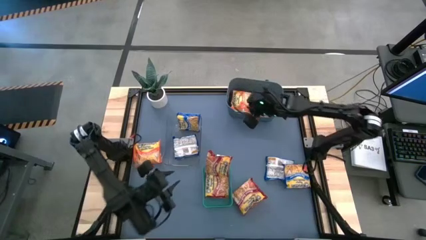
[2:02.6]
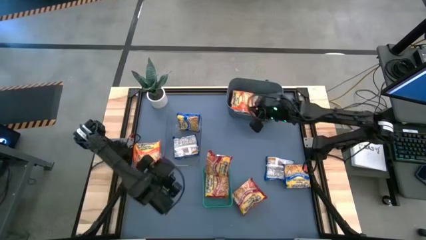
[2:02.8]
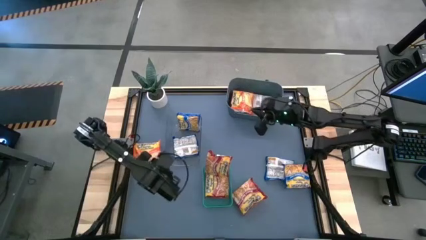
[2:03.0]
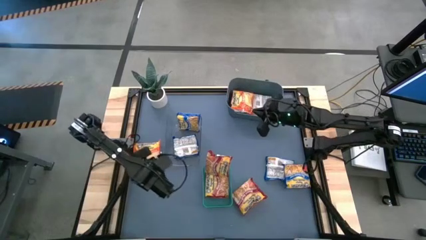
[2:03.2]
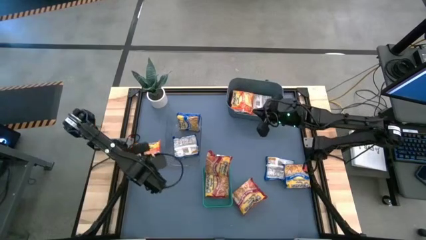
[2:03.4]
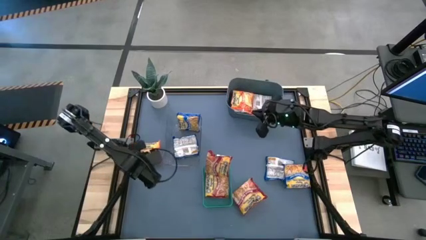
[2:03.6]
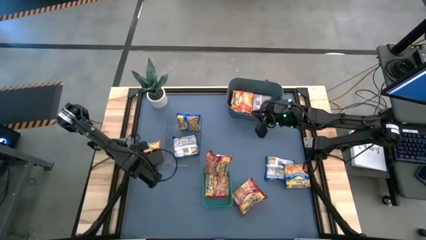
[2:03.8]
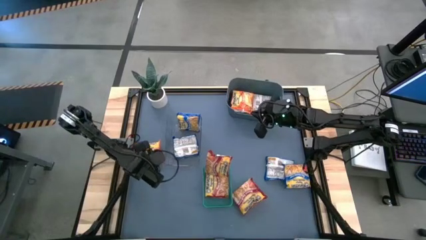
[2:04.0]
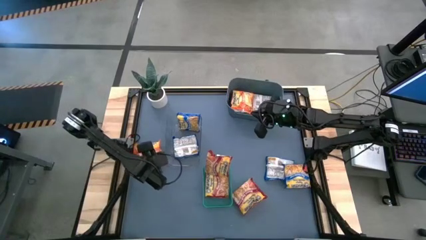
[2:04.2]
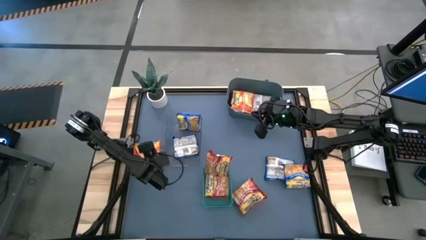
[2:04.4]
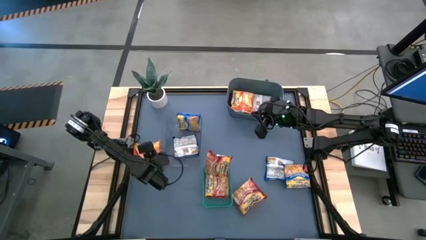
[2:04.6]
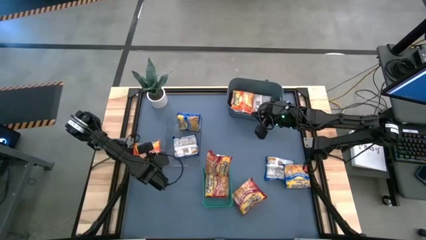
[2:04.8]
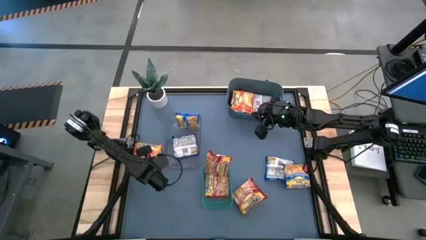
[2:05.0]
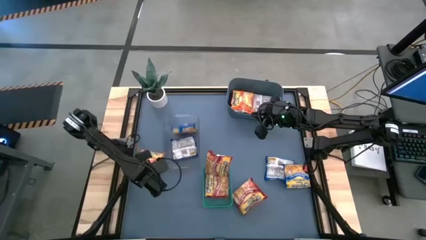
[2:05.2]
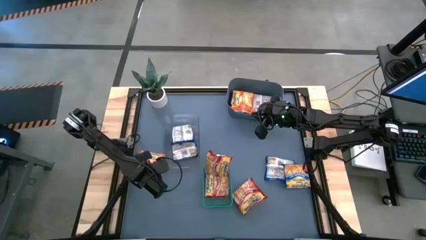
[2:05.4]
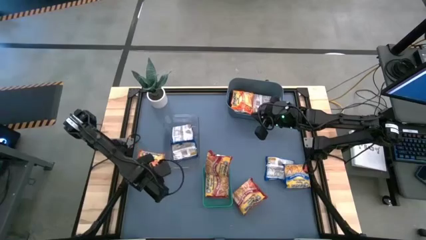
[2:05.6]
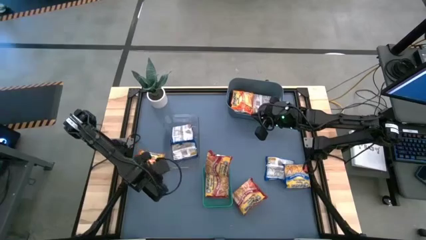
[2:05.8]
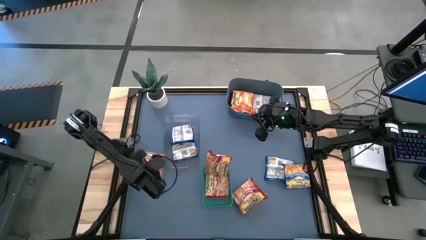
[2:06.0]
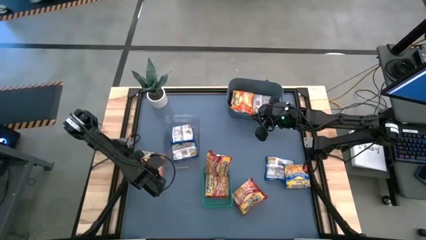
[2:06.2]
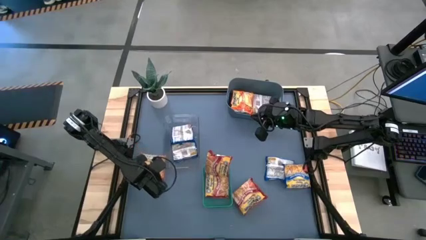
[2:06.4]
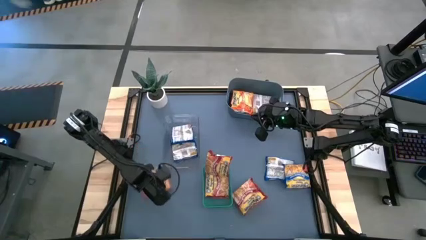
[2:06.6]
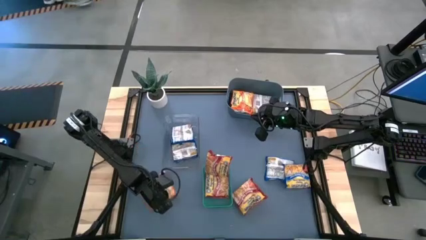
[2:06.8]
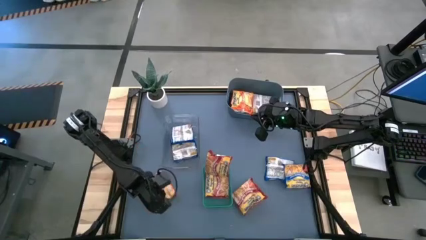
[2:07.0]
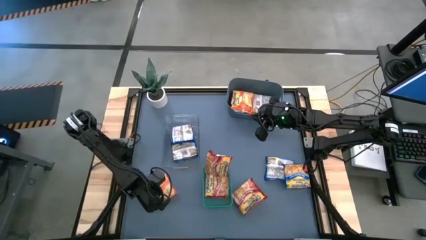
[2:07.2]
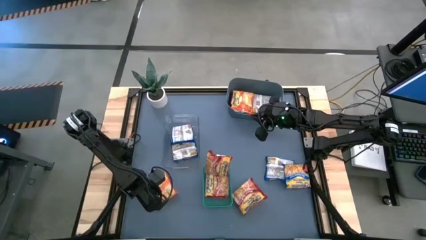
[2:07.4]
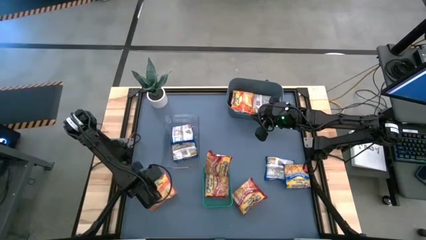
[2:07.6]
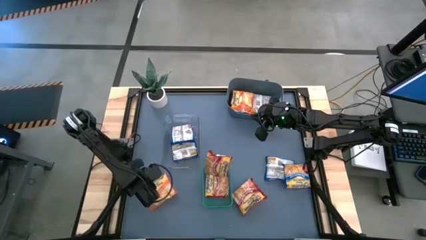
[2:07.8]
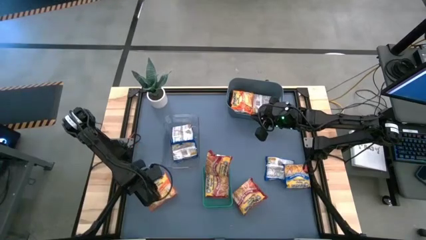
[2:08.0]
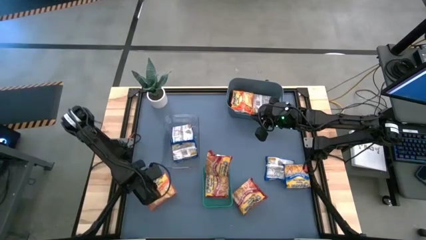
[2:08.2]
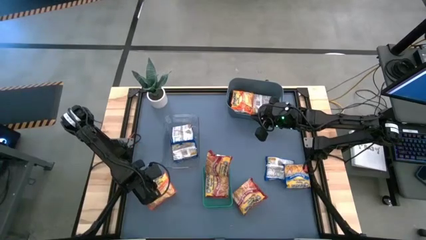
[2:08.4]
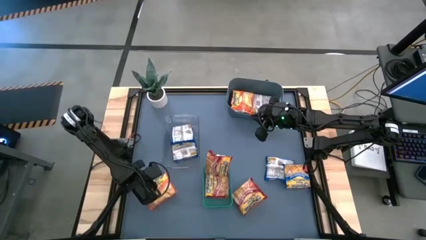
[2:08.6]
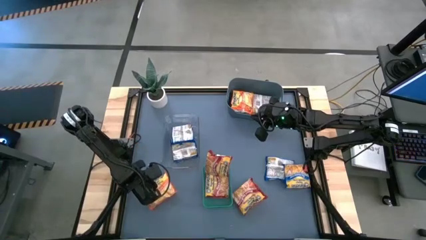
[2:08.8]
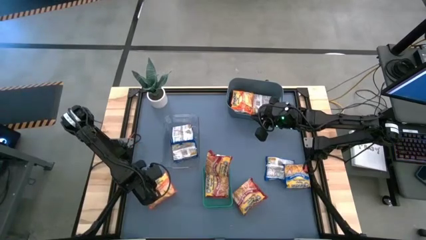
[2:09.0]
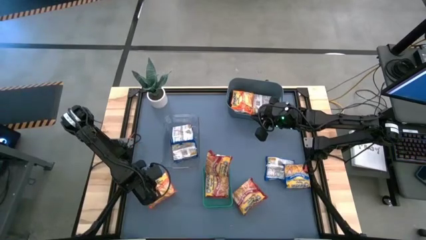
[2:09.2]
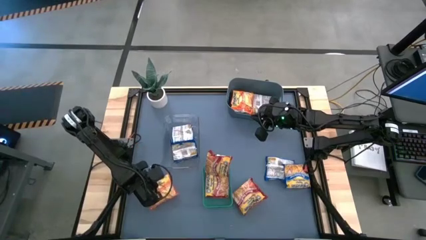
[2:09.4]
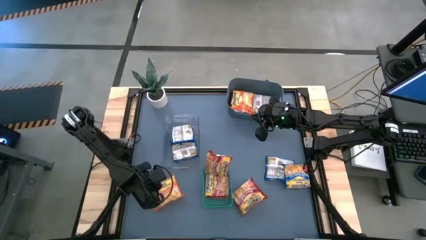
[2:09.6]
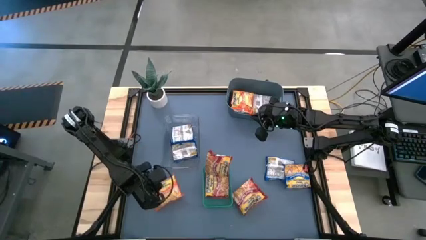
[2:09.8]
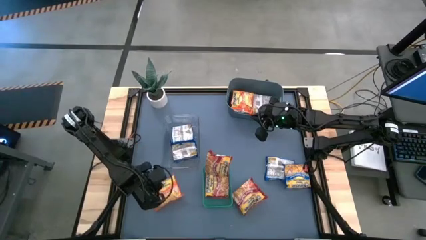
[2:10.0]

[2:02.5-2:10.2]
Task: Sort Maruchan noodles
Put the orange noodle pack into the dark blue bin

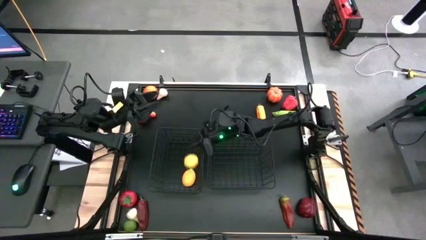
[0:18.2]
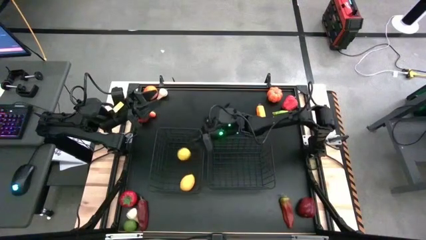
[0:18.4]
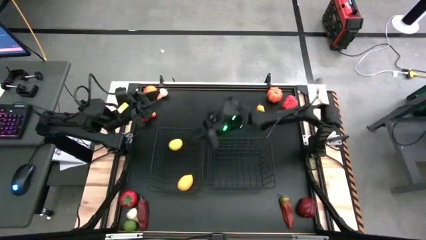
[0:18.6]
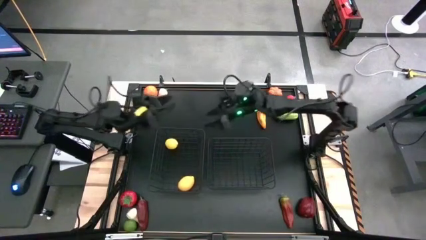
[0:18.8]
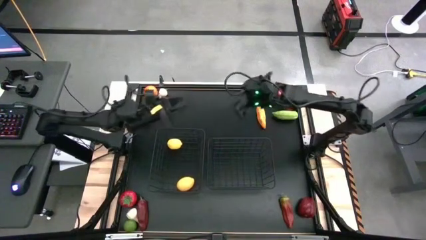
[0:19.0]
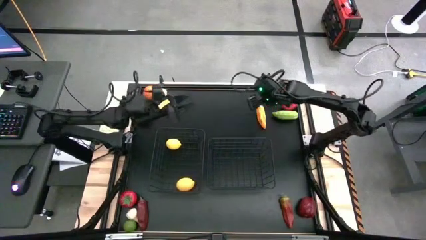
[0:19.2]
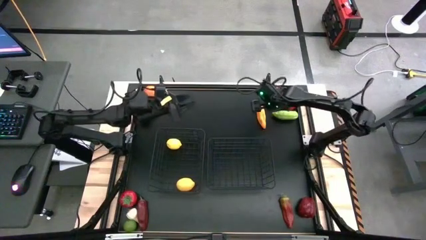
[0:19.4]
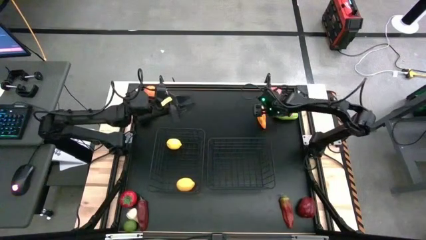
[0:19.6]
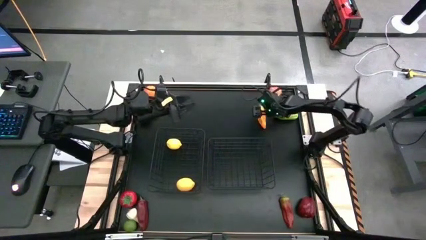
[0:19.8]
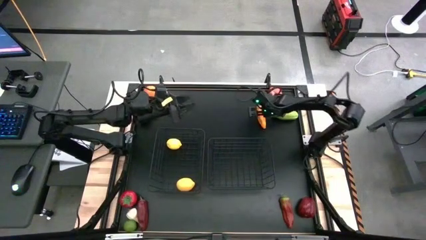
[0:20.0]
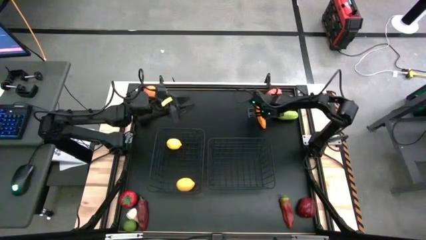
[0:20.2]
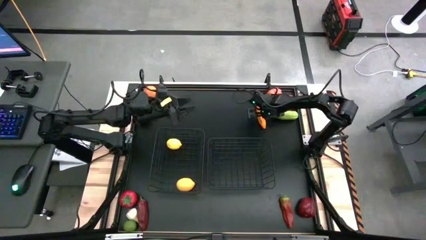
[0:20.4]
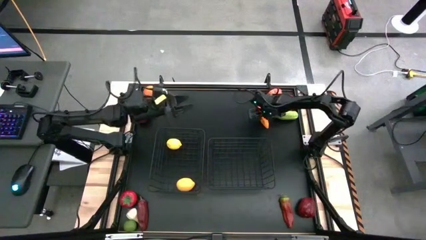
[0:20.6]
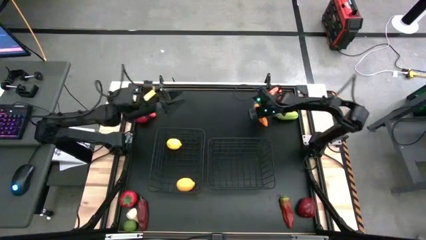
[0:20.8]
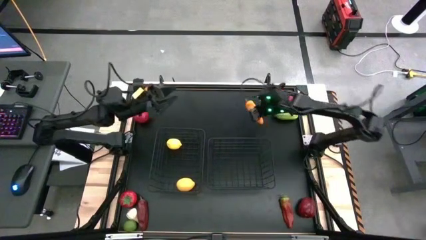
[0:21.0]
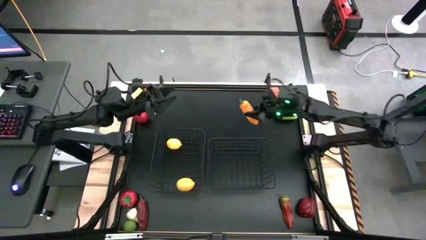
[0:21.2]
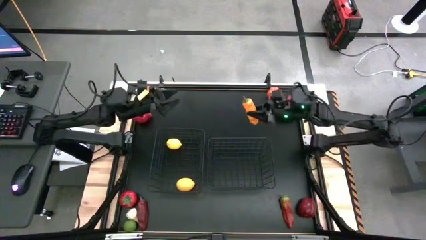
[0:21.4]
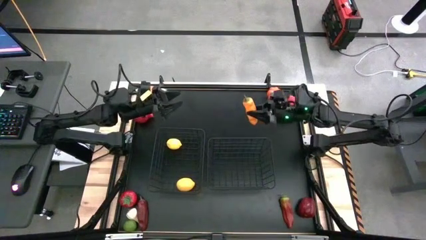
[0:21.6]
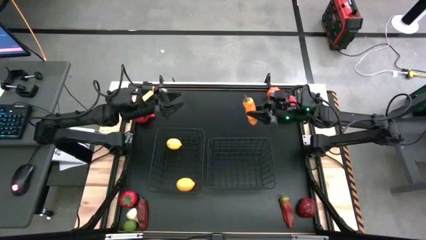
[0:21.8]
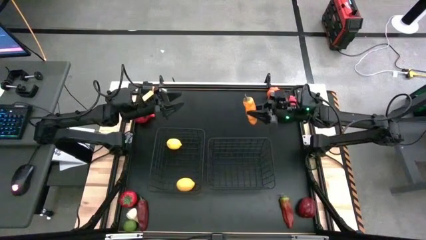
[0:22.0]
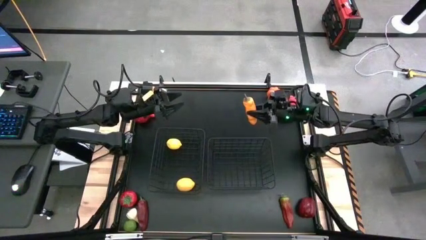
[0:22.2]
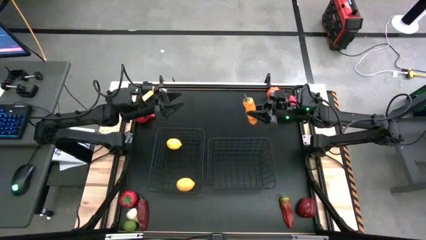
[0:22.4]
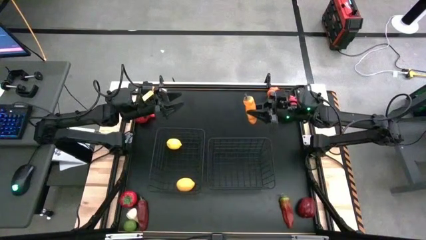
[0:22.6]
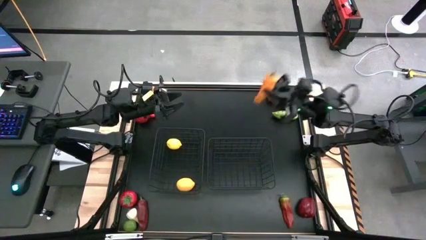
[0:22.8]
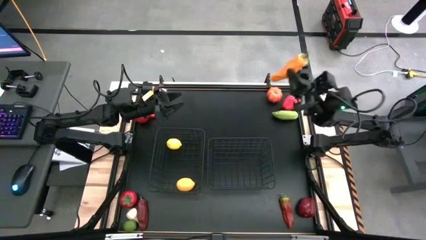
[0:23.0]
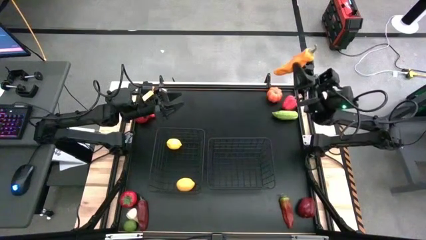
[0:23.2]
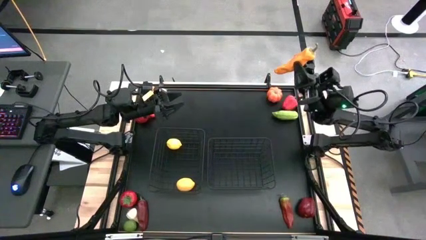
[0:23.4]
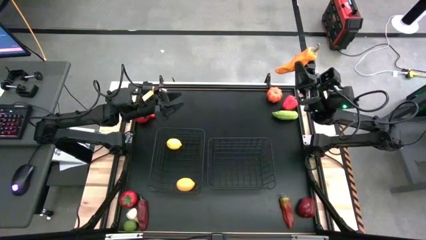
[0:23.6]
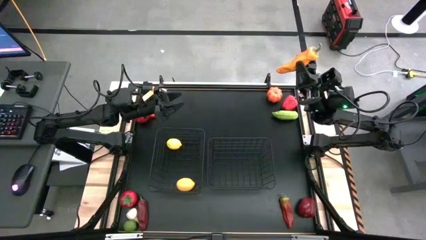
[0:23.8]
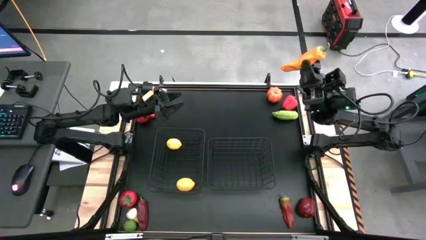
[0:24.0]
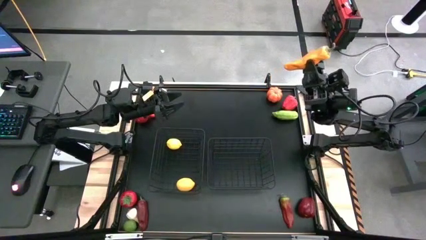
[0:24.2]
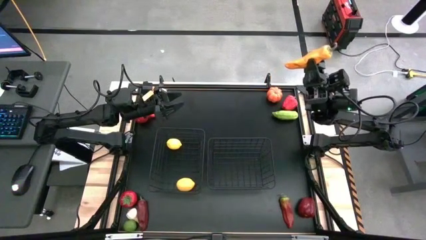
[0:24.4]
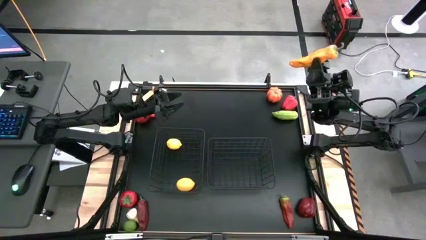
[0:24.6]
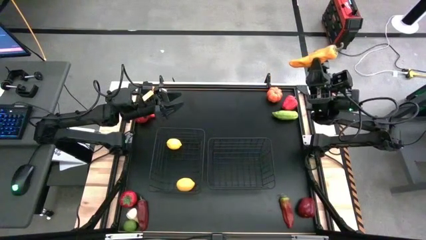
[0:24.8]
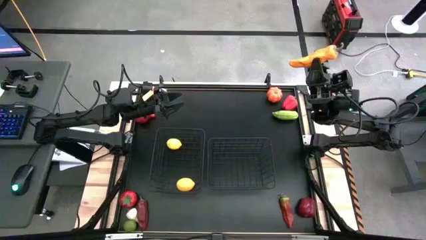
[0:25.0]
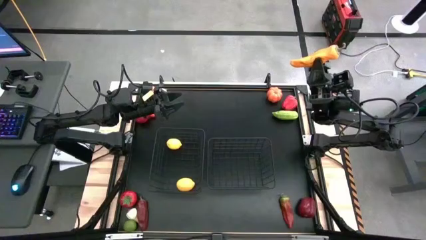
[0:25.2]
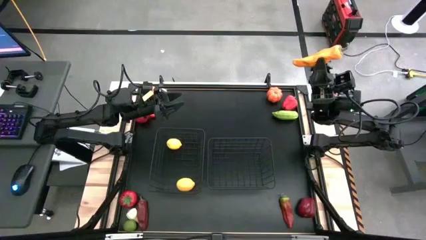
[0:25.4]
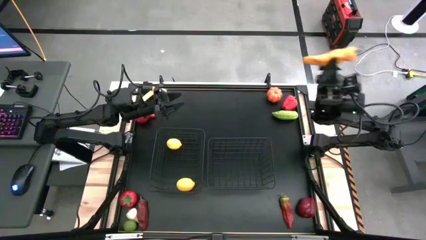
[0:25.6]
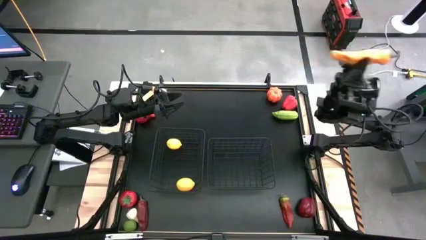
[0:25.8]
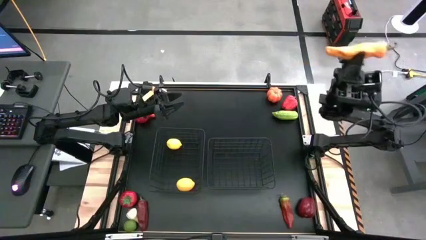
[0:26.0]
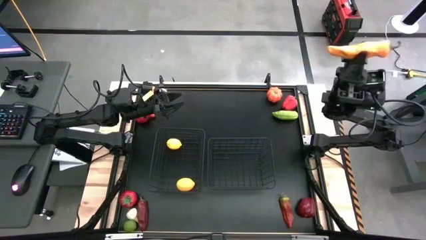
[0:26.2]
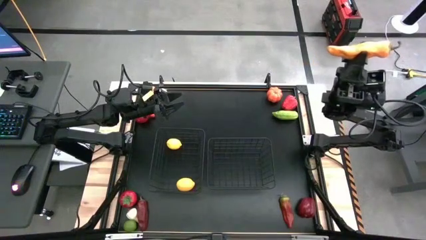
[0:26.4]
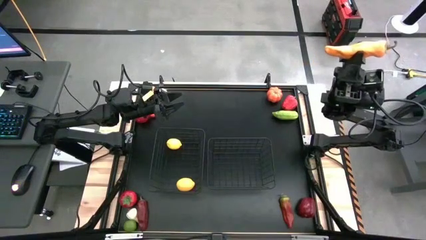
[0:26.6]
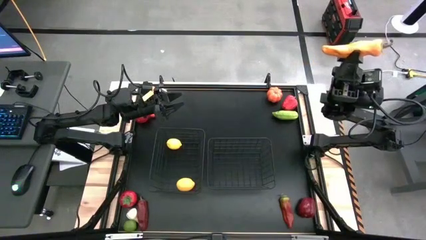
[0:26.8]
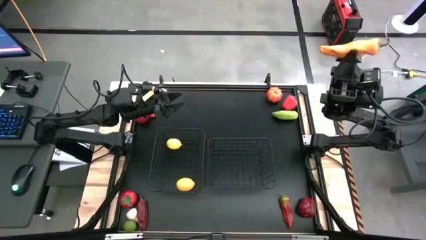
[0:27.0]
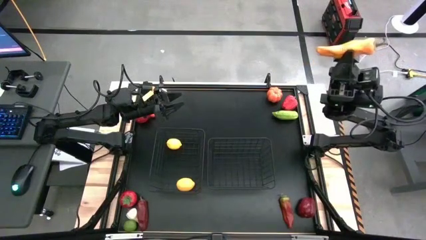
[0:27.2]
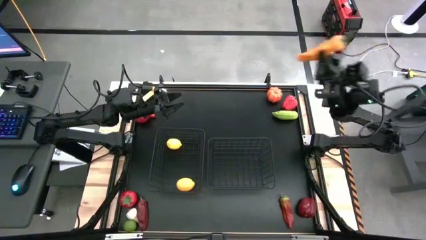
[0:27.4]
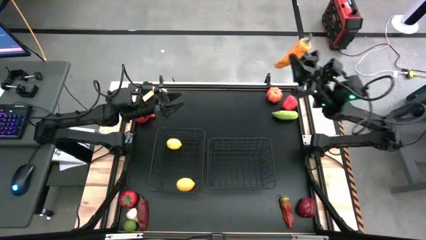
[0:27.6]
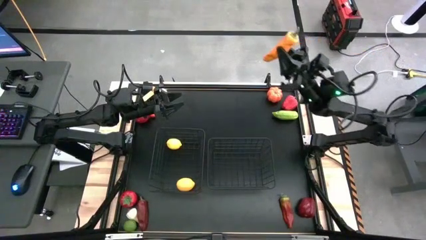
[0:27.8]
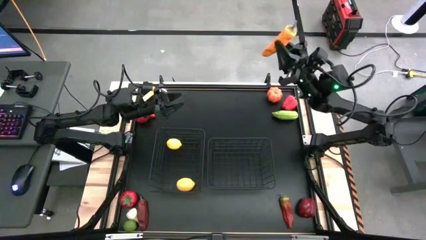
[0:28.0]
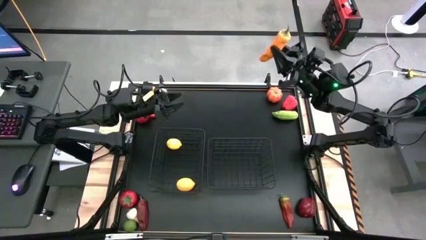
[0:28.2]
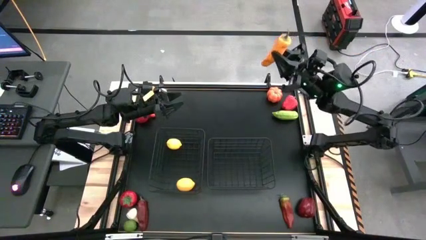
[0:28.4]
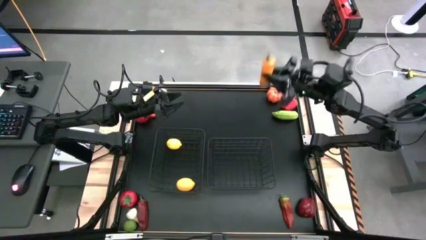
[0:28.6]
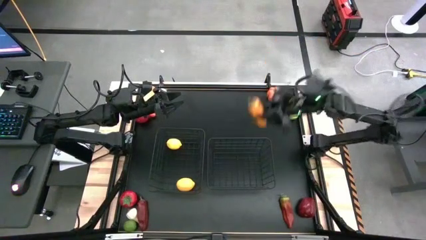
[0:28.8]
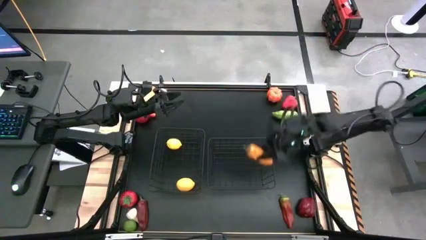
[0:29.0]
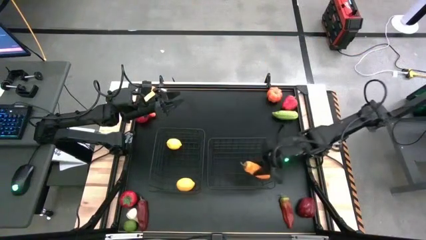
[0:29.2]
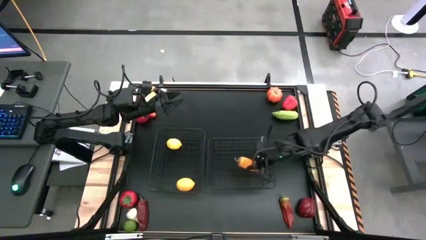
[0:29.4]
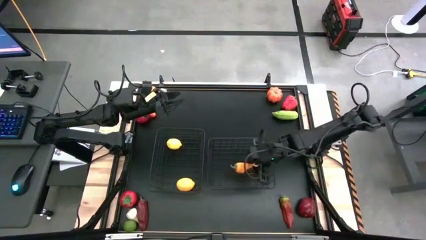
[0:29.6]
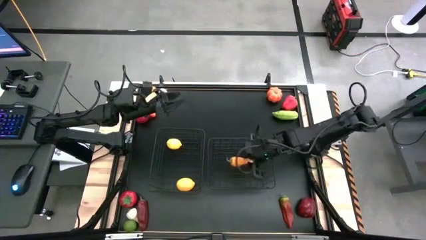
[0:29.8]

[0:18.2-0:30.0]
Task: Sort produce into baskets
Put the orange chili pepper into the right wire basket
